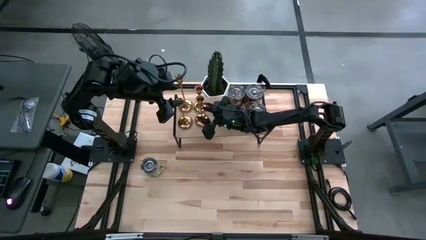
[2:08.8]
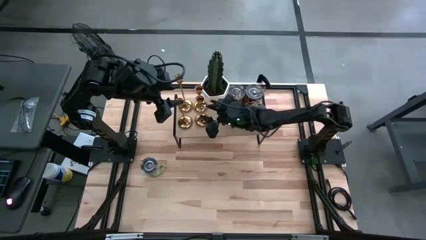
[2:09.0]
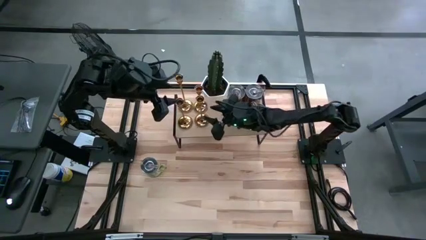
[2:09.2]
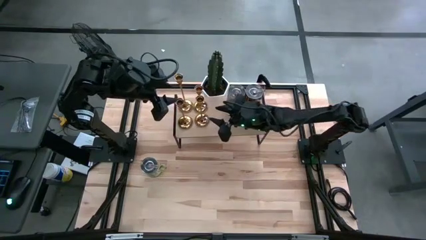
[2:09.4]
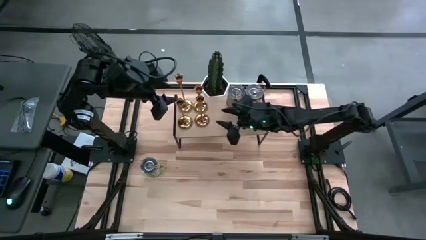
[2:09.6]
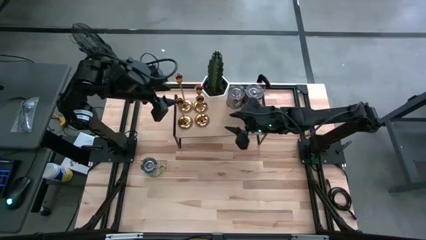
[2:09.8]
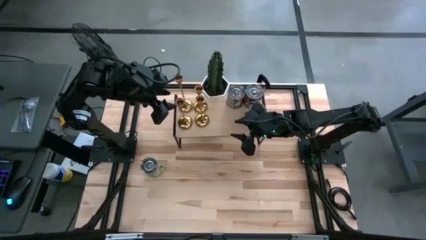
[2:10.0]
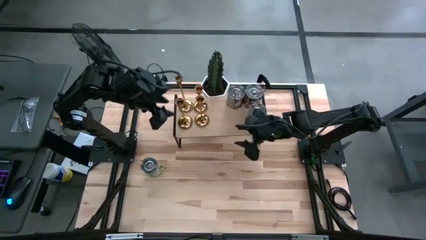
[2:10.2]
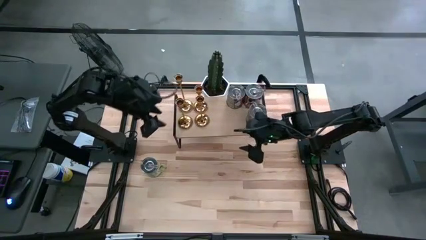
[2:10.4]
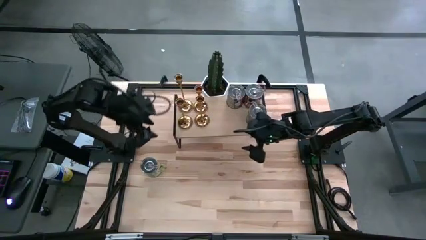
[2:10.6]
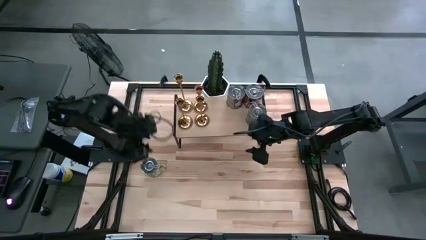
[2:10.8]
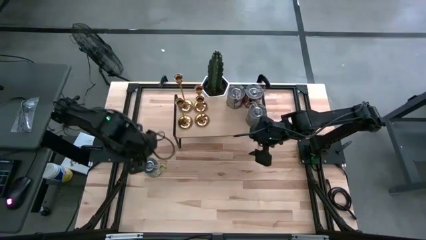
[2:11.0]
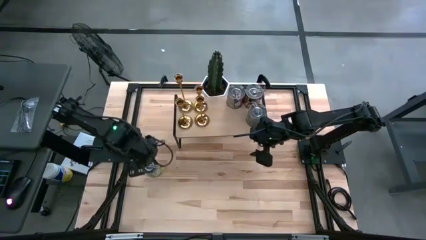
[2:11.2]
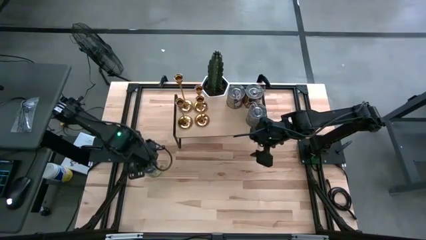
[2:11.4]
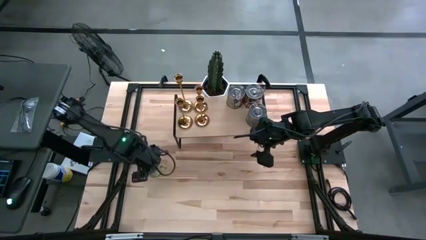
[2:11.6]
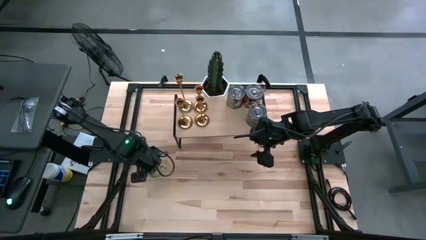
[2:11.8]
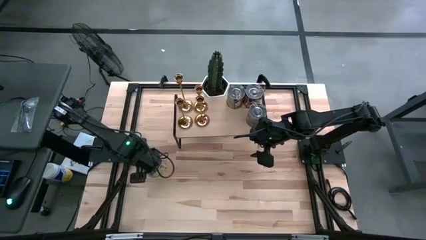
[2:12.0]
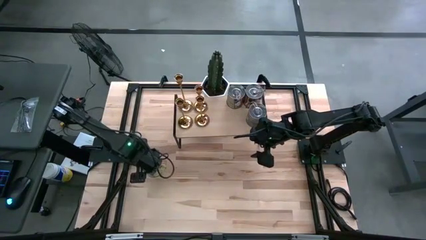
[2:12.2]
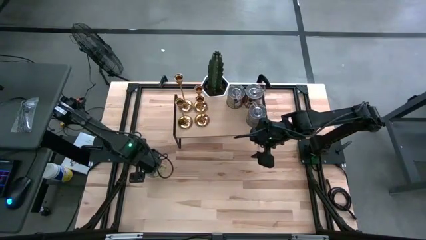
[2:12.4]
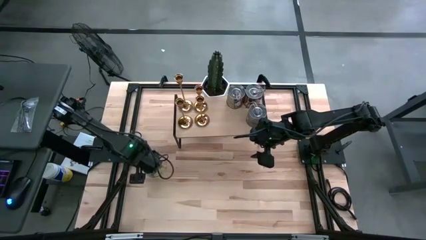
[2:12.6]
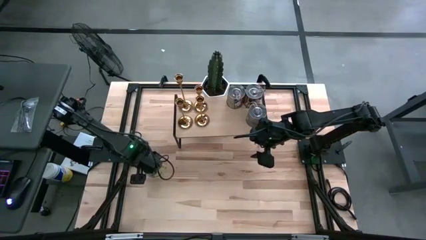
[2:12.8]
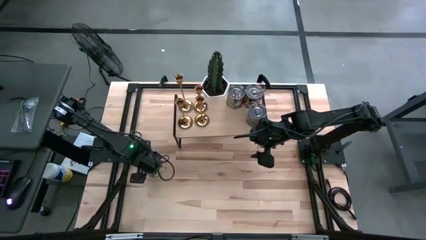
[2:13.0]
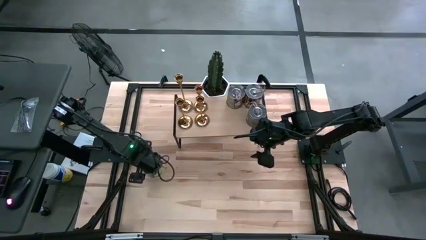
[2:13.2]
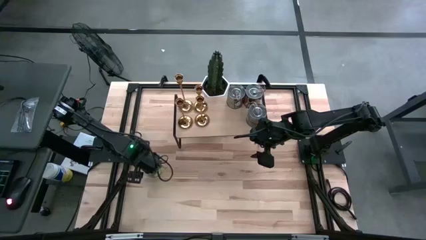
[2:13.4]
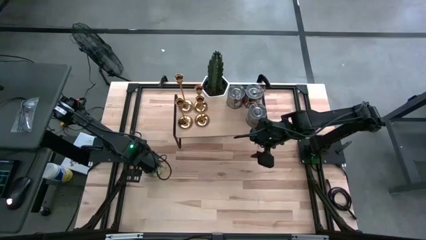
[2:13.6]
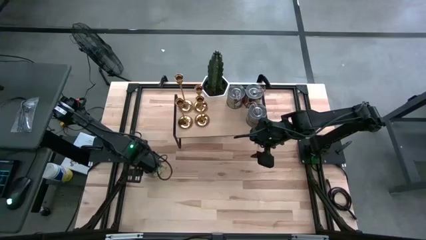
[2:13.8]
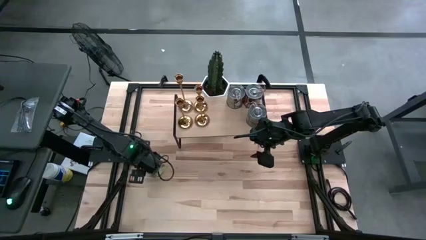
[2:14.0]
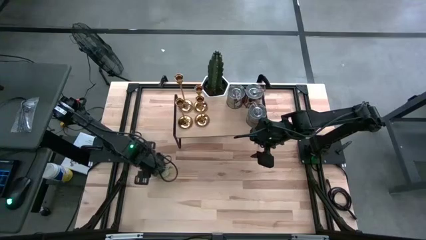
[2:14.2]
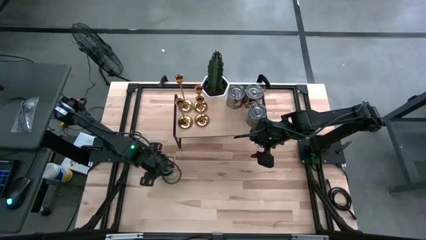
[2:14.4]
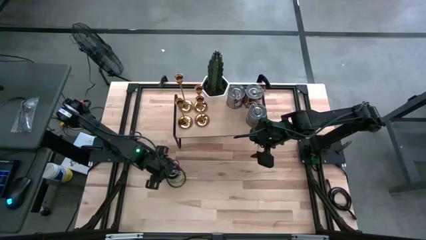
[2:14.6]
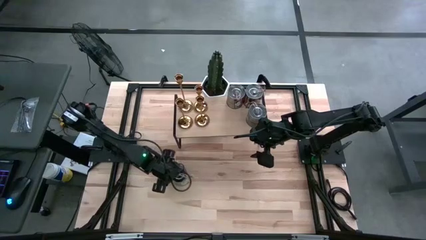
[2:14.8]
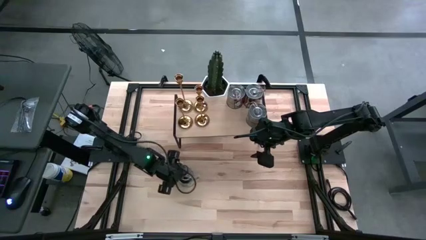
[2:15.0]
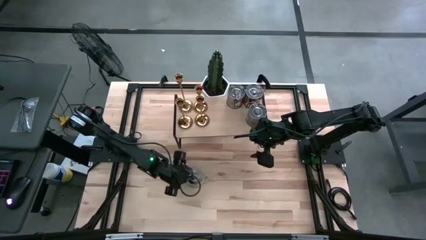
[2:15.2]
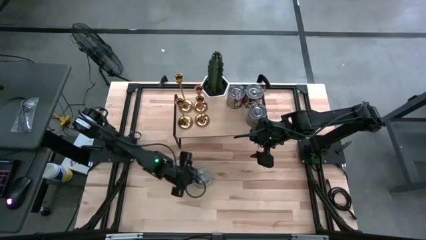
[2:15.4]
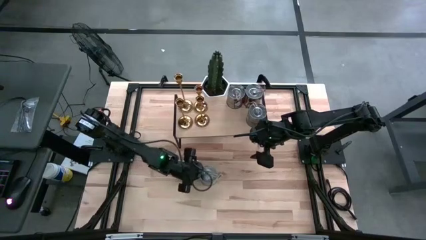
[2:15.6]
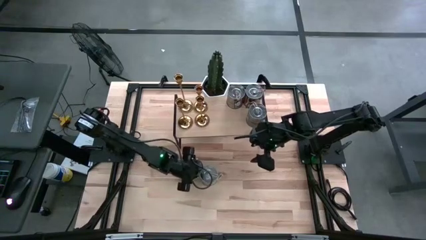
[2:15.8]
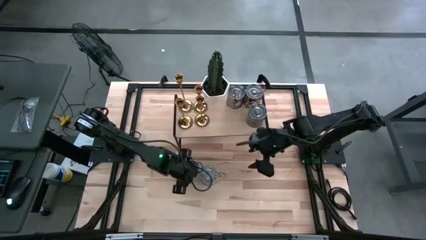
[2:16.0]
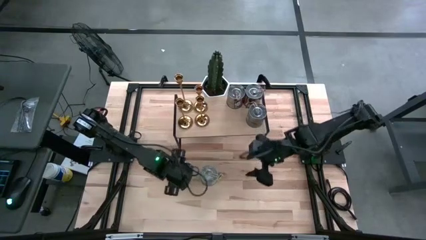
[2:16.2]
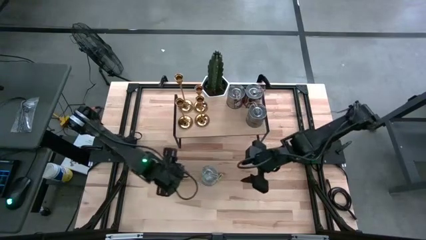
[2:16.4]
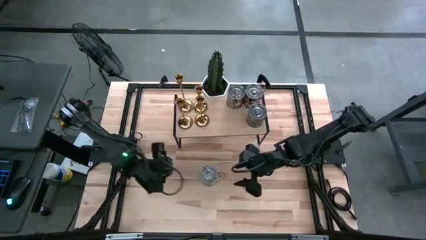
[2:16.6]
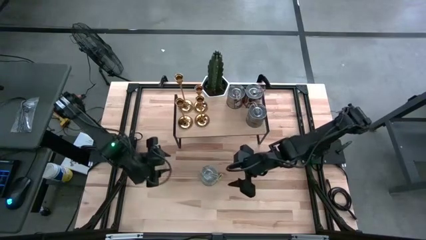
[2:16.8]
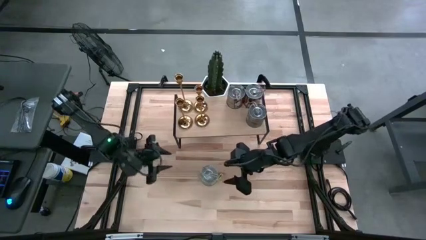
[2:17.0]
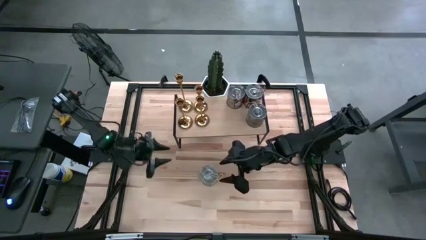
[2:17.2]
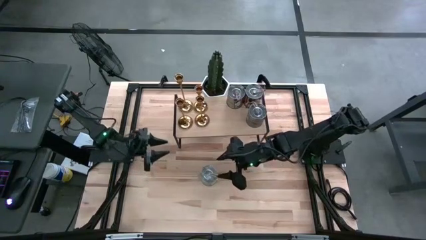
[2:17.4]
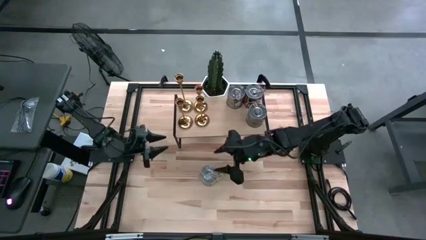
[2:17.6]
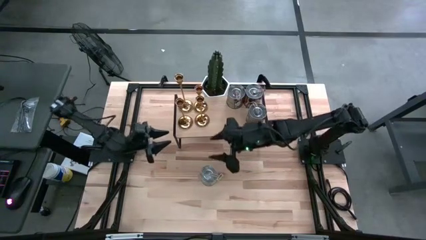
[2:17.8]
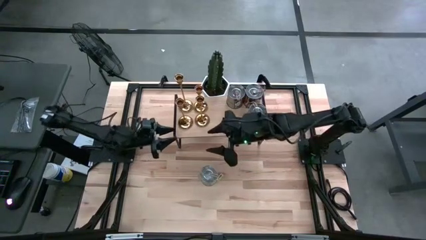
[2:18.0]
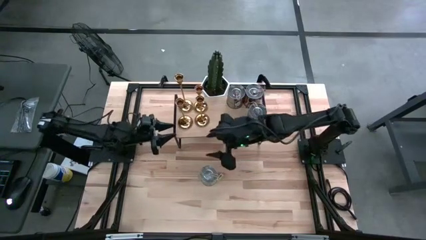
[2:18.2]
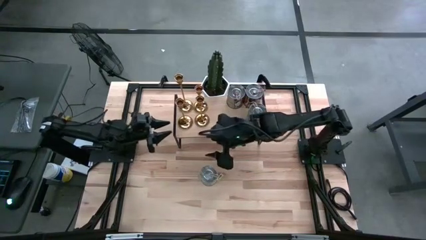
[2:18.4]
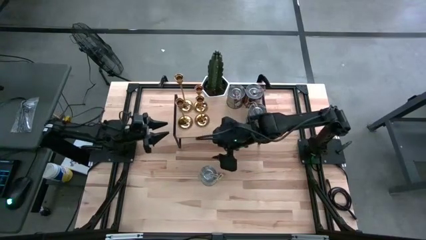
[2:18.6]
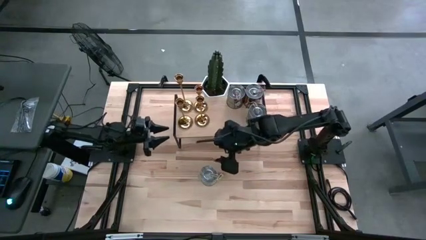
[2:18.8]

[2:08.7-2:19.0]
Task: Pick & Place candle stick holders
Put the silver scented candle can on the shelf
